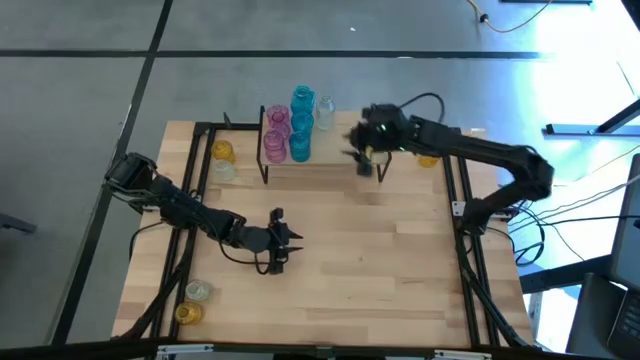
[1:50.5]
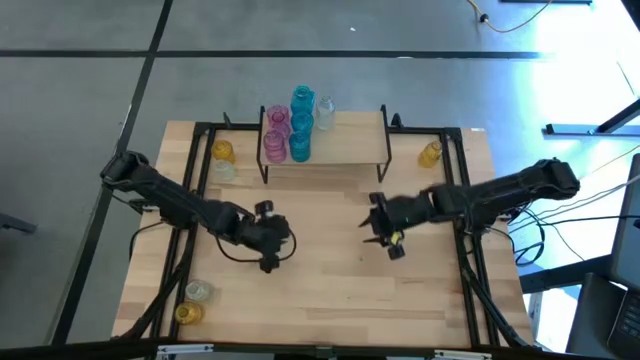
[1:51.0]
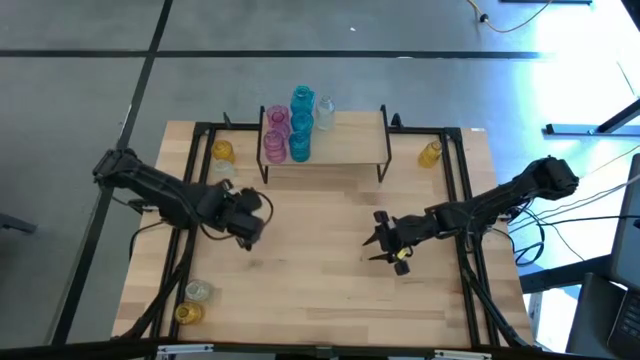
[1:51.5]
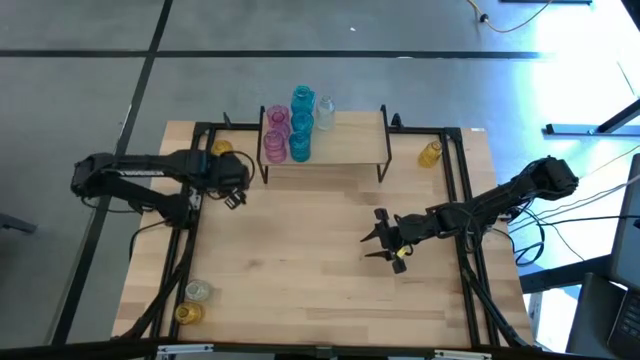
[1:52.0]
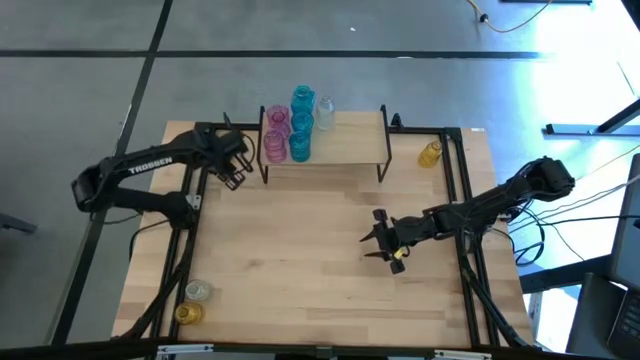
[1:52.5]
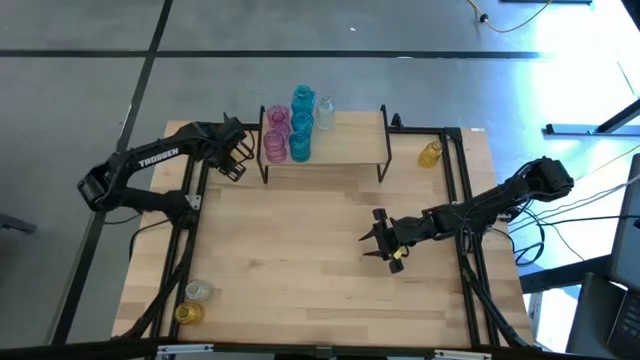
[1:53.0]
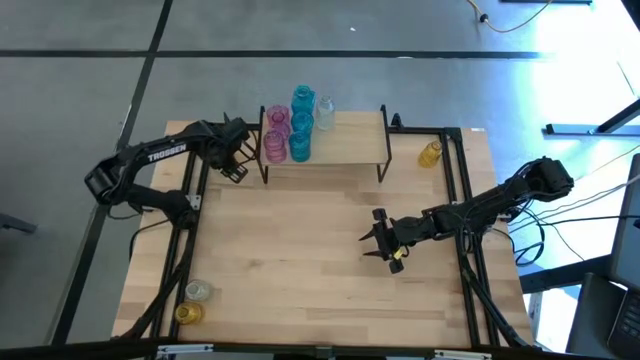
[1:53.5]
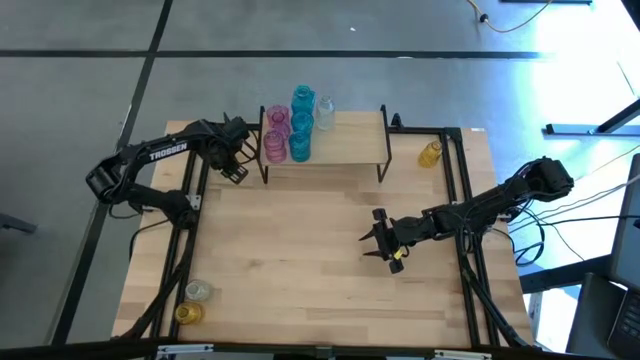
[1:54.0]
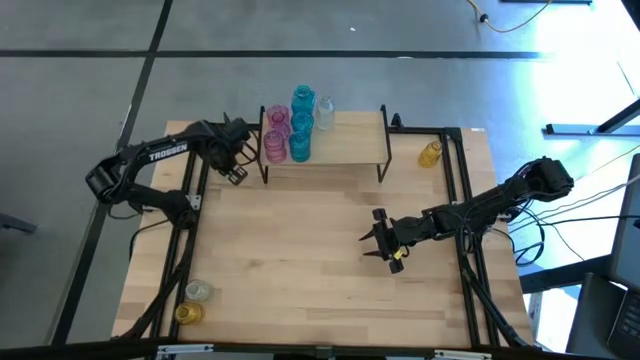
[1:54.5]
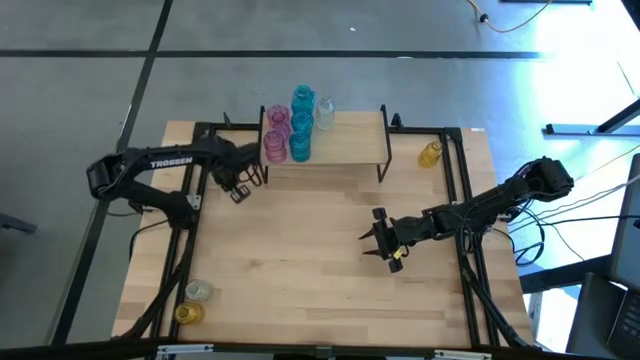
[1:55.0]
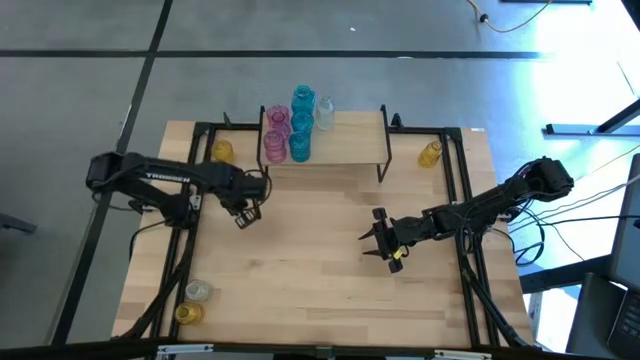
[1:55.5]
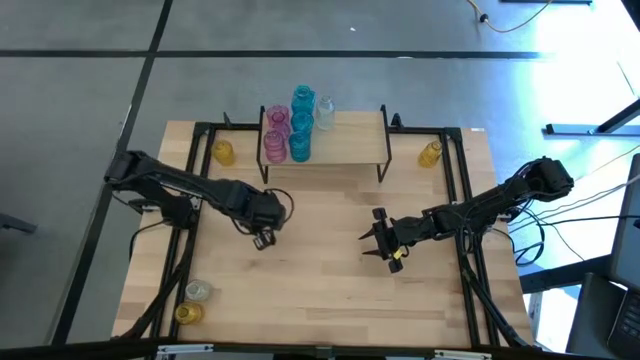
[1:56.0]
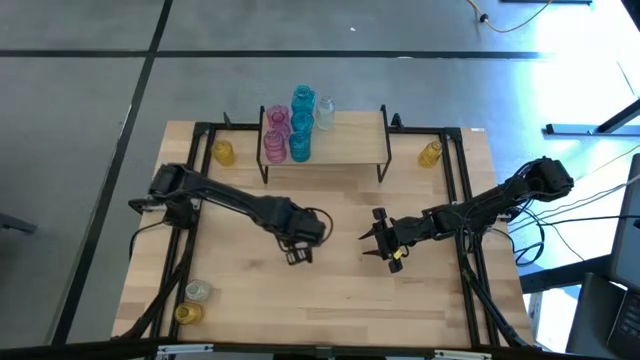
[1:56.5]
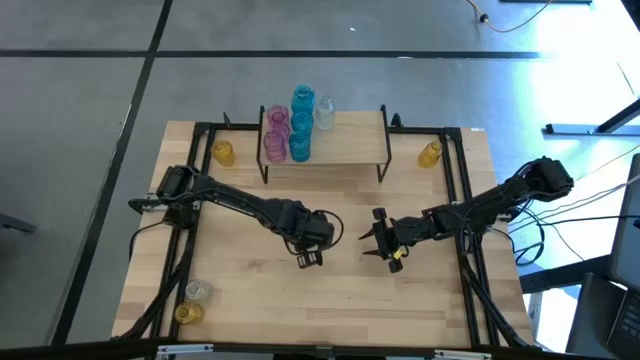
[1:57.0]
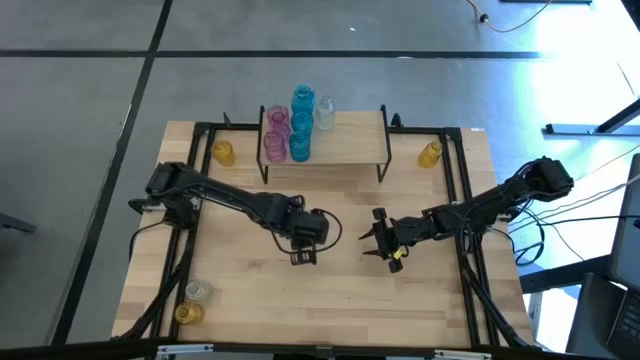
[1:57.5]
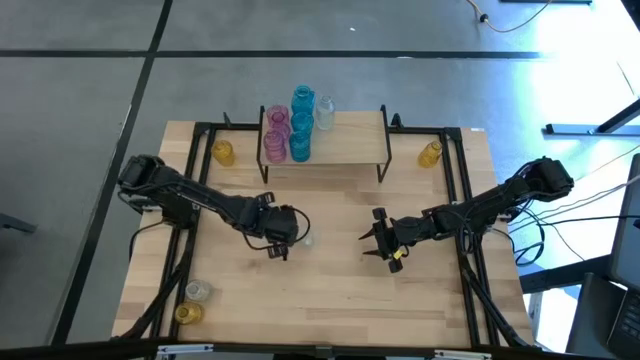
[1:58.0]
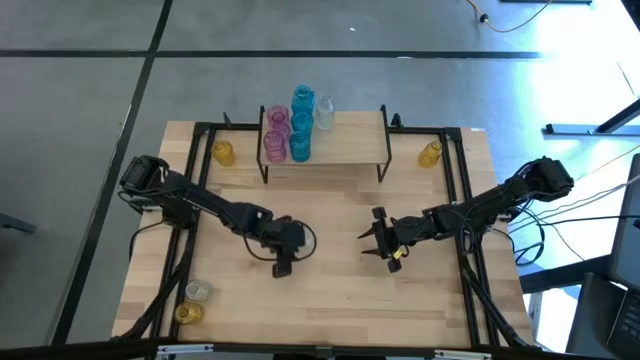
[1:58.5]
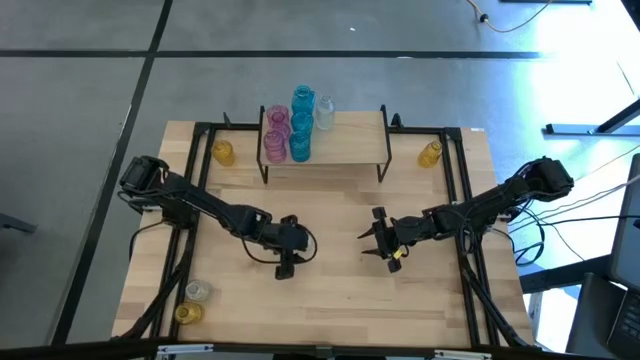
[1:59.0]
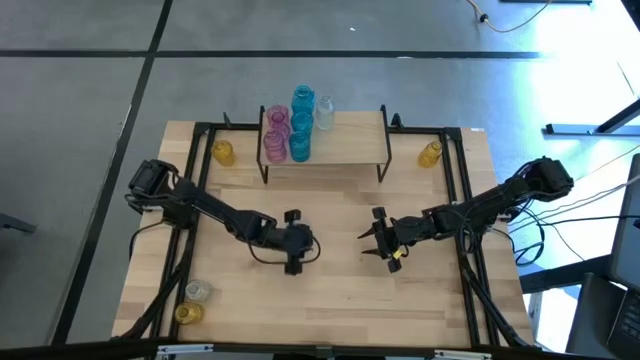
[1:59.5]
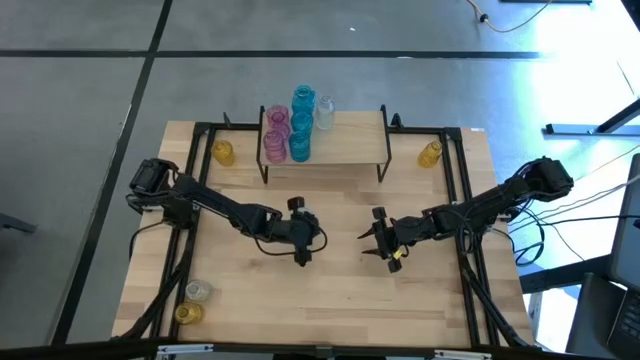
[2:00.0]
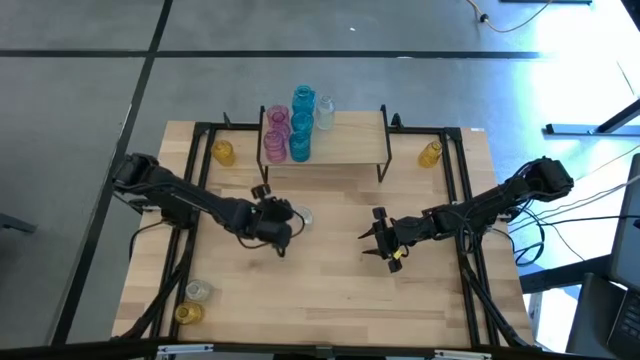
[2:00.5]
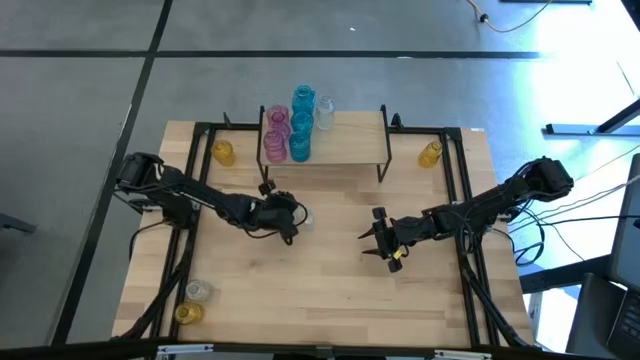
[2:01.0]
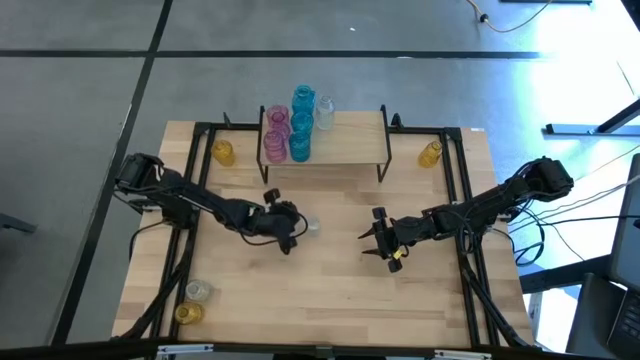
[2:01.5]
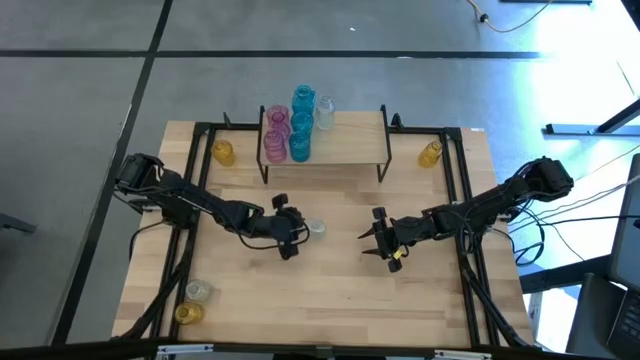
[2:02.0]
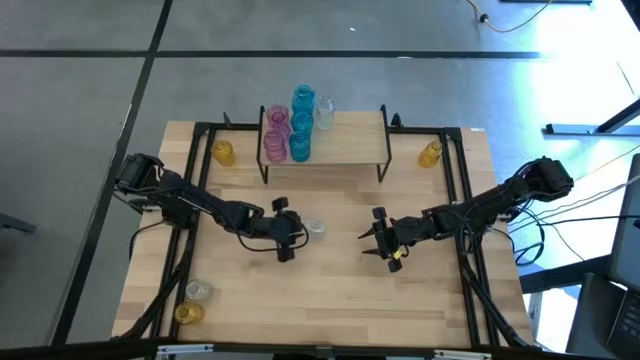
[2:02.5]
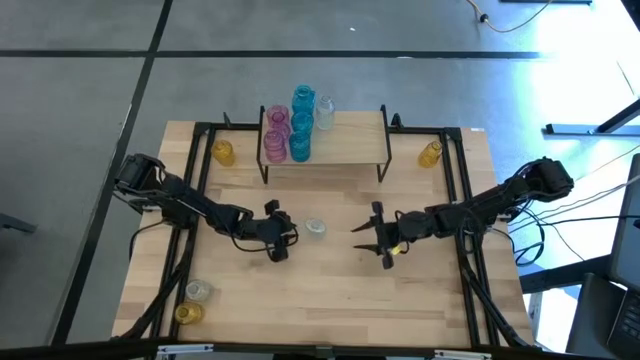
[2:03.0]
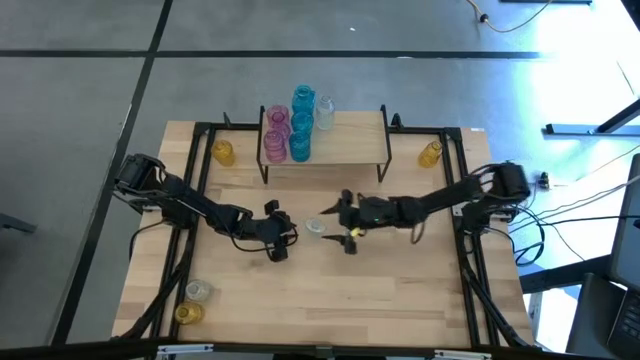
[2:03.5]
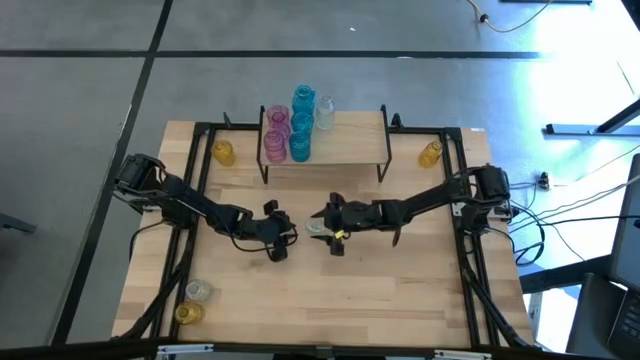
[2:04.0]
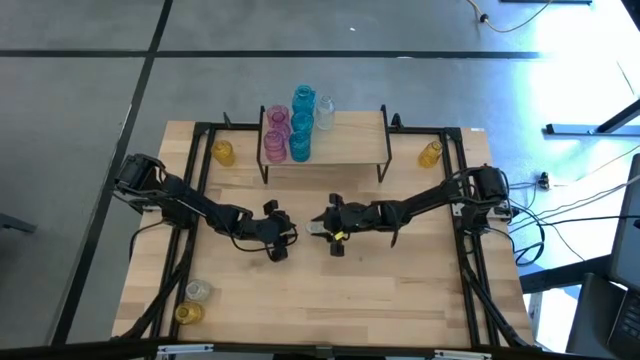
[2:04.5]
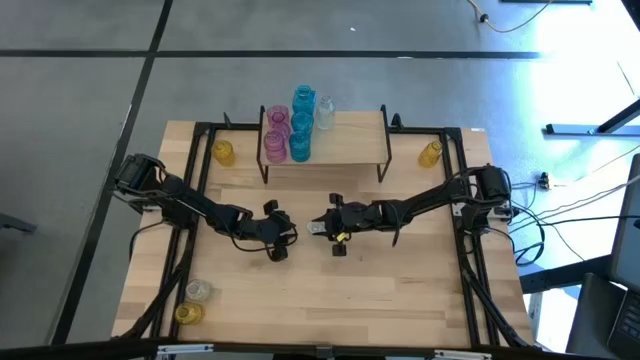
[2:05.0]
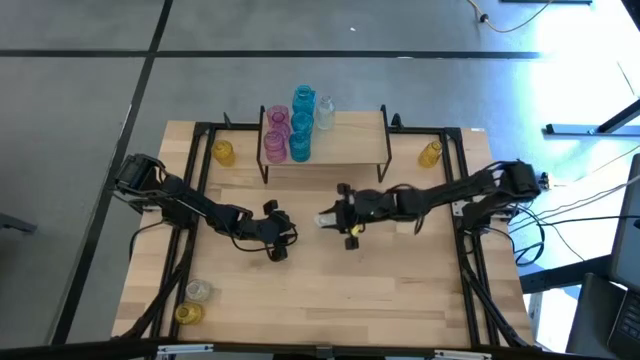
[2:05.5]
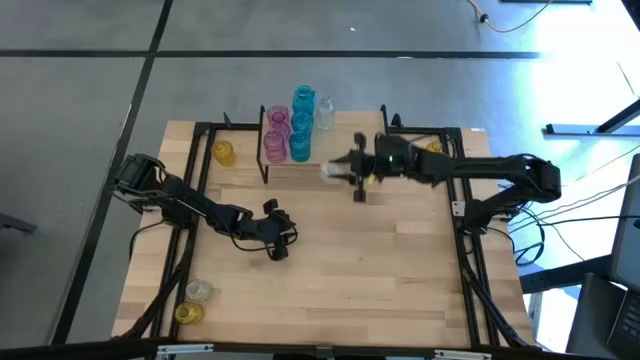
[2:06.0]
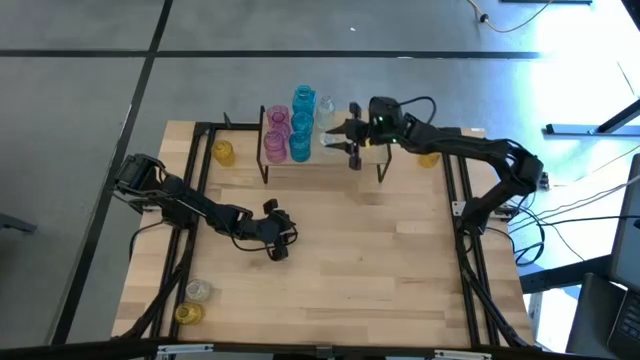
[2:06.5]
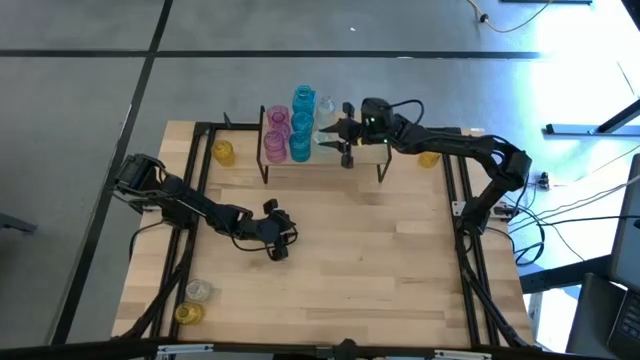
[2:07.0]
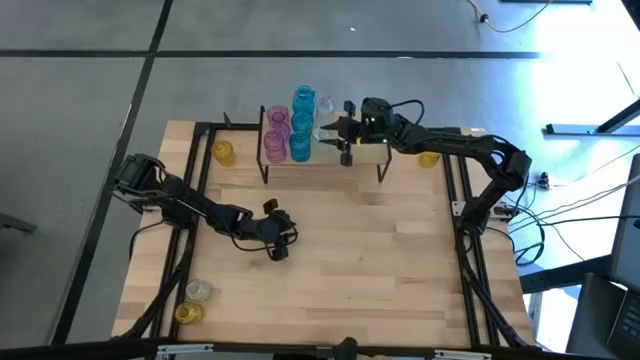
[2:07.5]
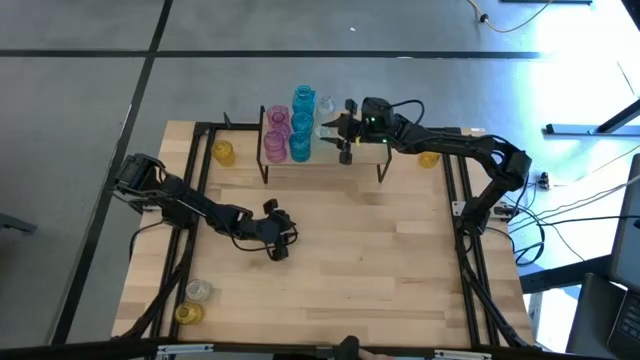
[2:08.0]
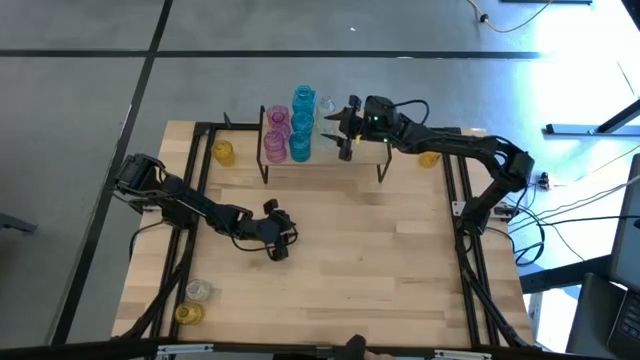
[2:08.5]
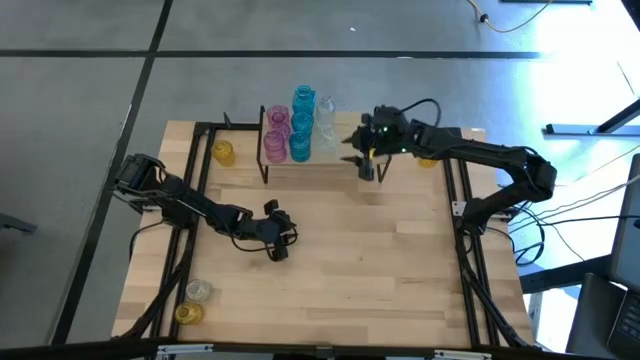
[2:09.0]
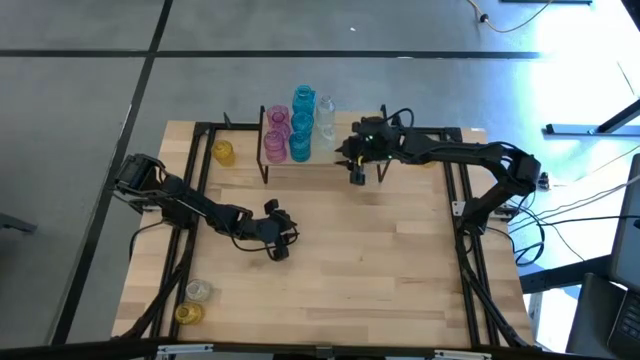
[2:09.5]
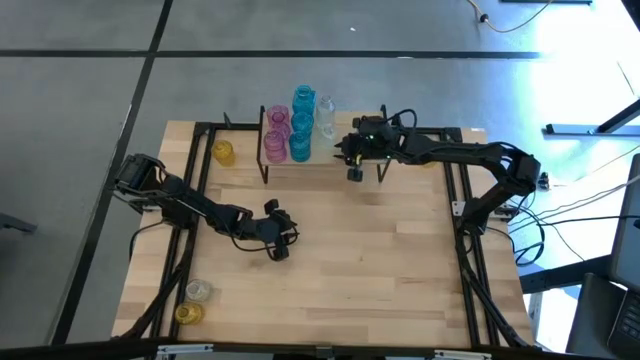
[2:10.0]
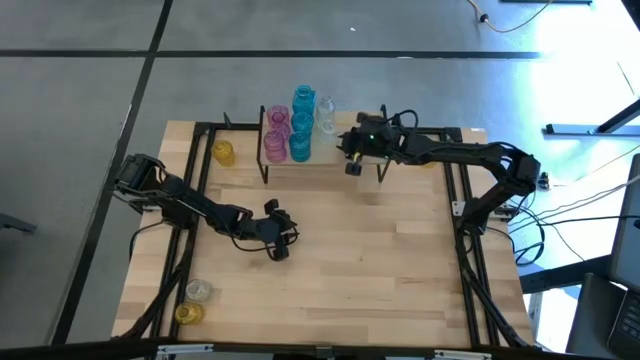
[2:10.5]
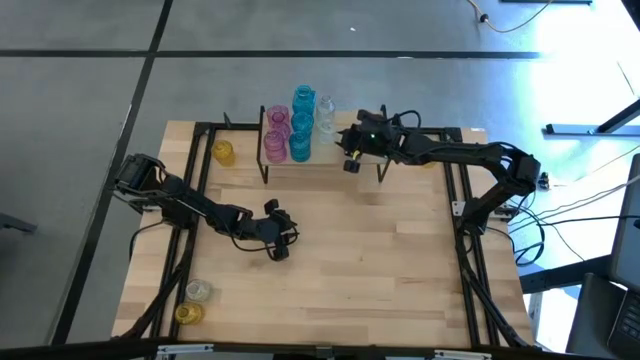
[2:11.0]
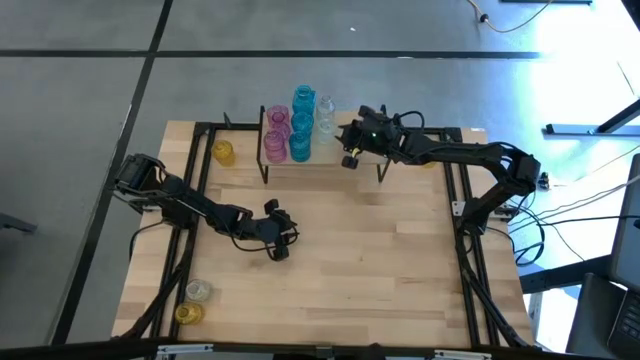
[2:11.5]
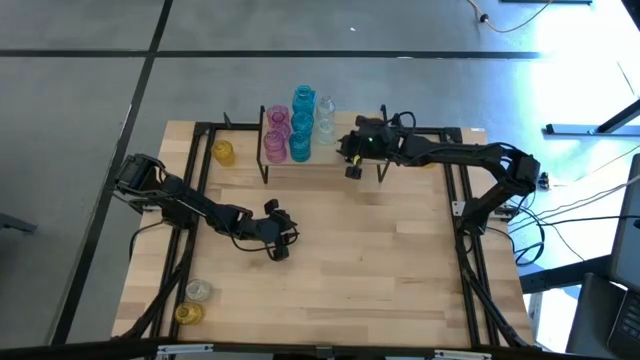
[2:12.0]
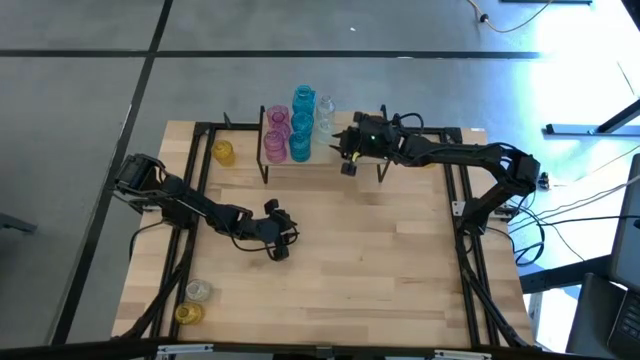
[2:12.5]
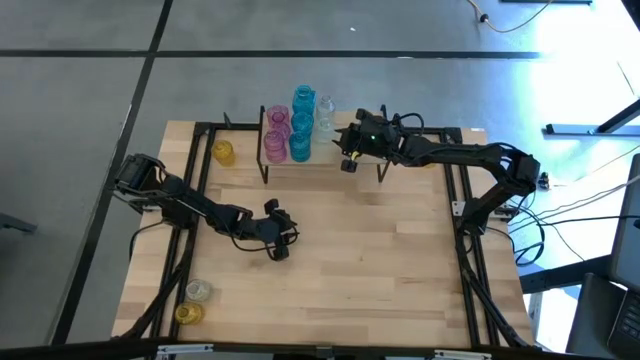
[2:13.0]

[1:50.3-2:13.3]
Task: sort vases onto shelf
Put the top transparent flower vase on the shelf aligned with the other transparent flower vase
